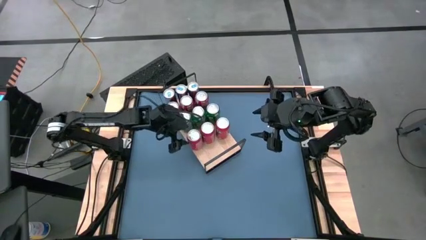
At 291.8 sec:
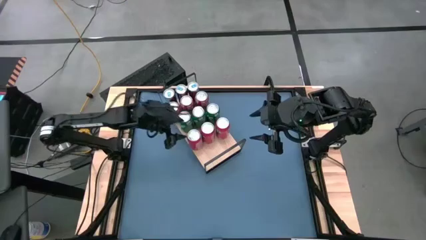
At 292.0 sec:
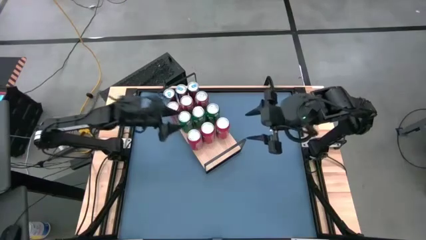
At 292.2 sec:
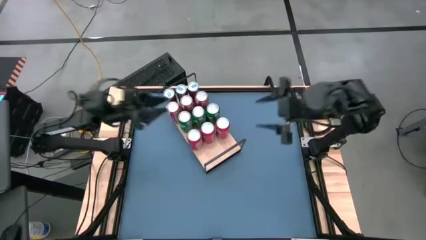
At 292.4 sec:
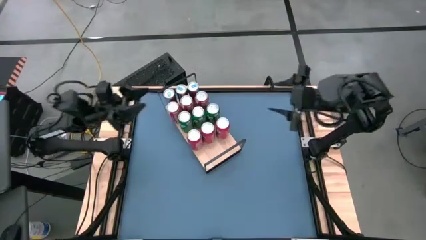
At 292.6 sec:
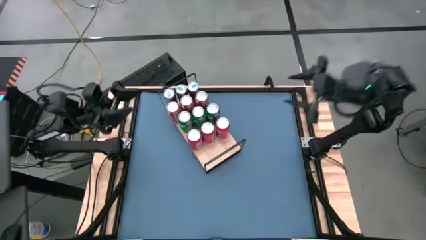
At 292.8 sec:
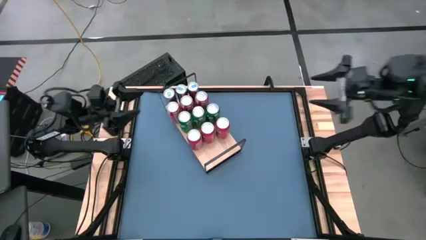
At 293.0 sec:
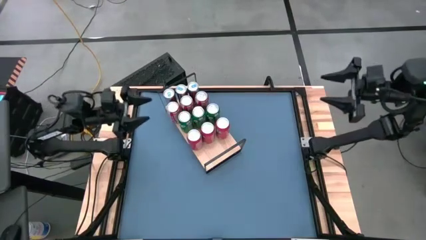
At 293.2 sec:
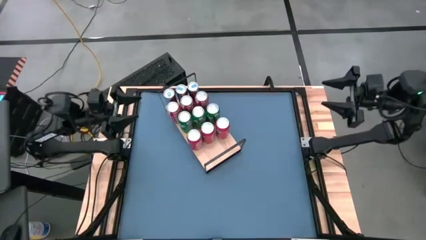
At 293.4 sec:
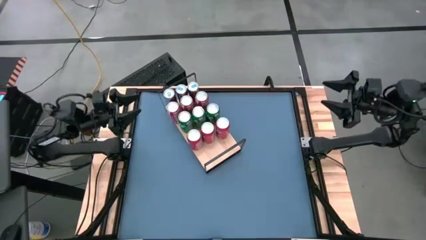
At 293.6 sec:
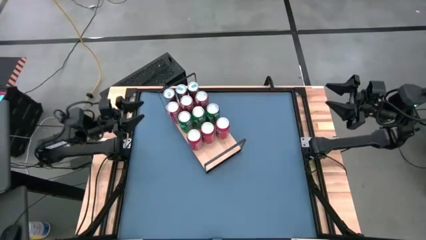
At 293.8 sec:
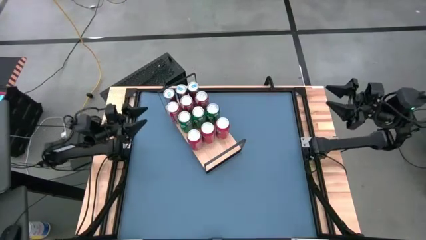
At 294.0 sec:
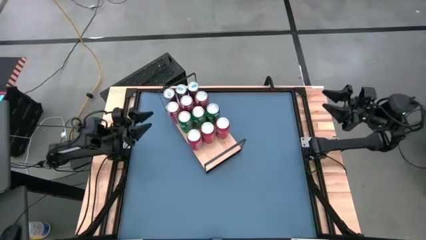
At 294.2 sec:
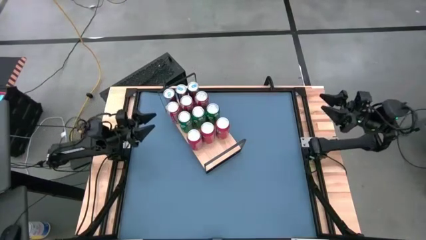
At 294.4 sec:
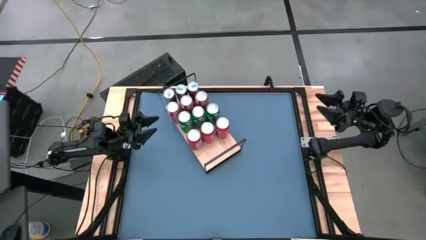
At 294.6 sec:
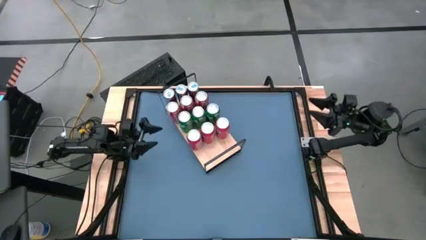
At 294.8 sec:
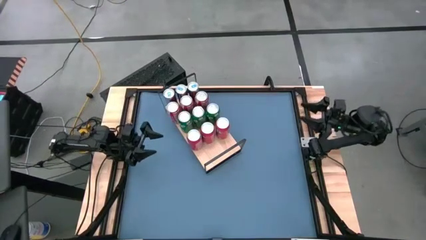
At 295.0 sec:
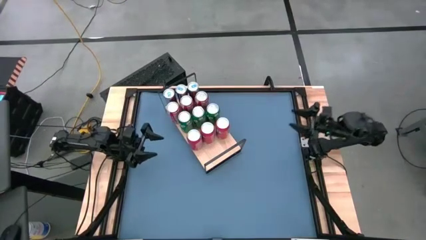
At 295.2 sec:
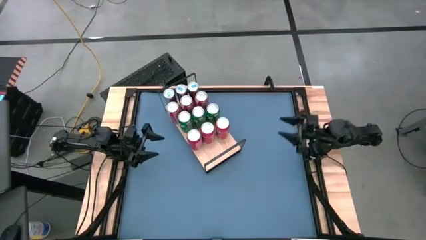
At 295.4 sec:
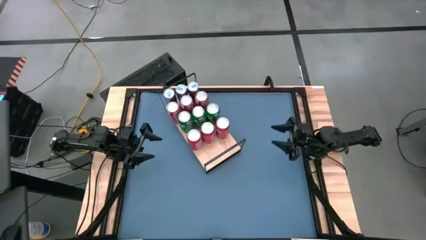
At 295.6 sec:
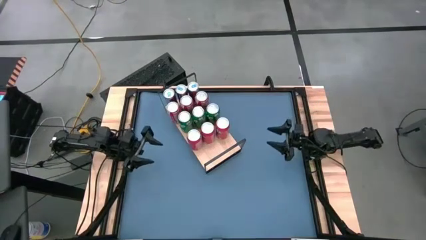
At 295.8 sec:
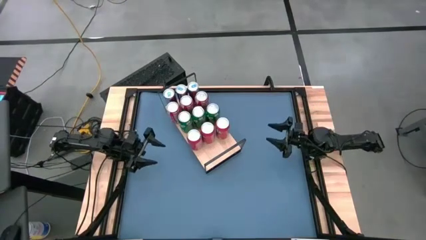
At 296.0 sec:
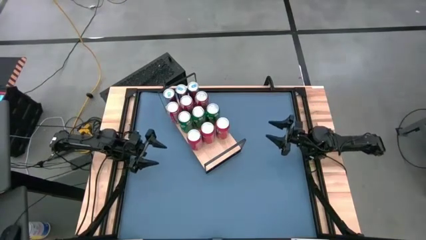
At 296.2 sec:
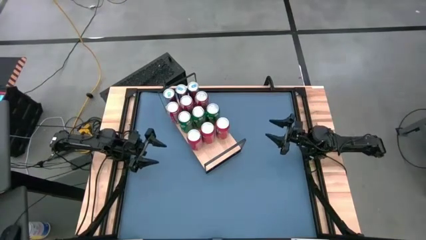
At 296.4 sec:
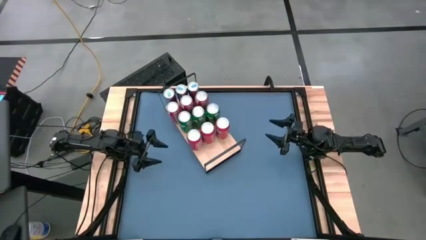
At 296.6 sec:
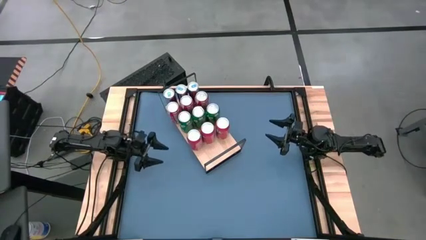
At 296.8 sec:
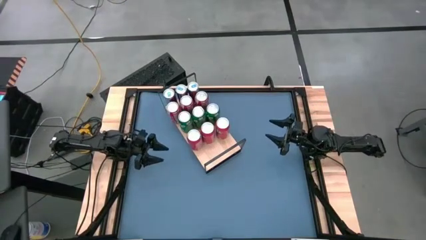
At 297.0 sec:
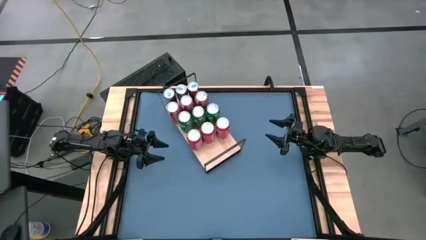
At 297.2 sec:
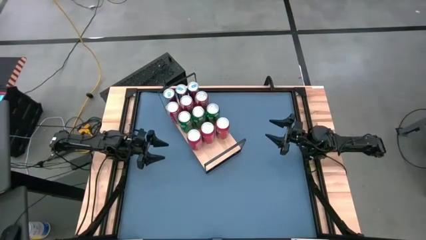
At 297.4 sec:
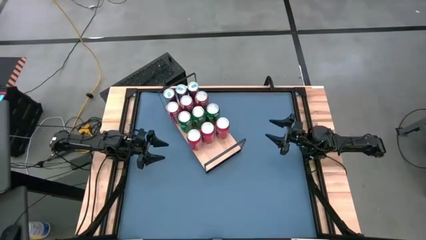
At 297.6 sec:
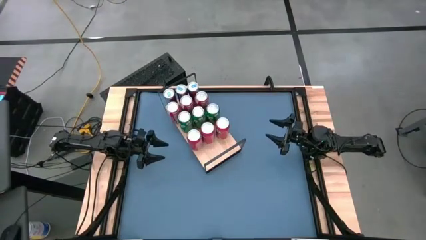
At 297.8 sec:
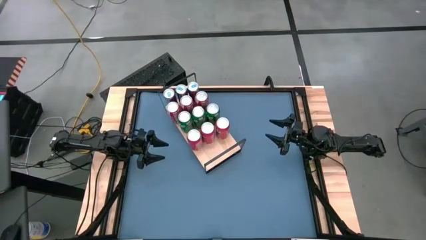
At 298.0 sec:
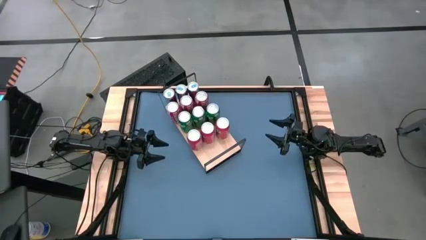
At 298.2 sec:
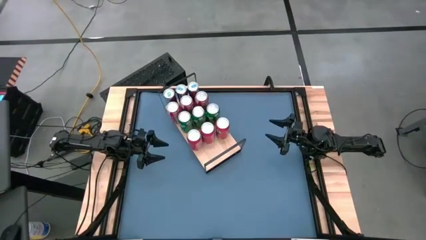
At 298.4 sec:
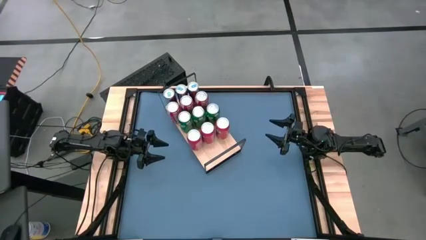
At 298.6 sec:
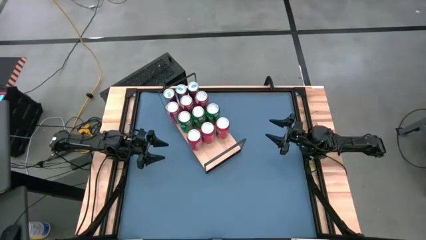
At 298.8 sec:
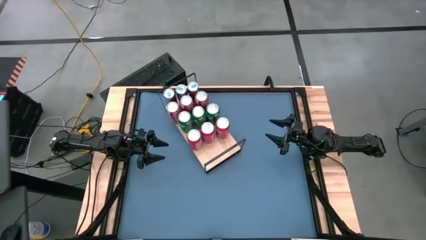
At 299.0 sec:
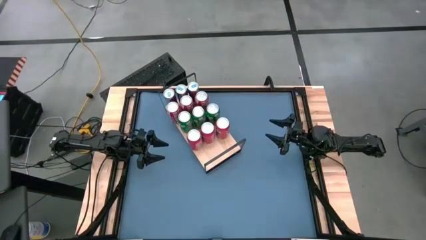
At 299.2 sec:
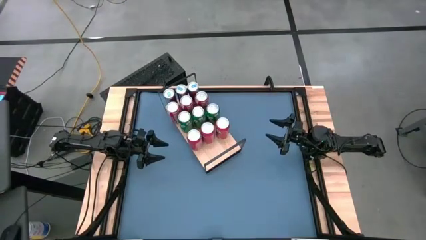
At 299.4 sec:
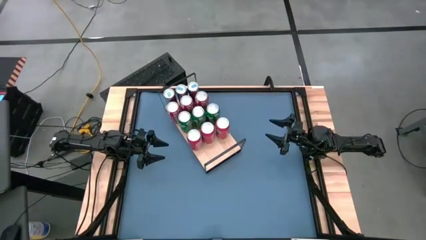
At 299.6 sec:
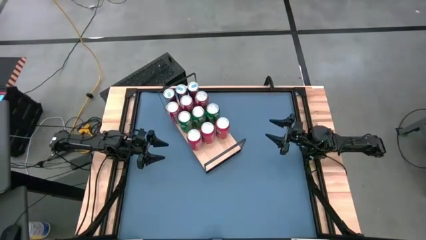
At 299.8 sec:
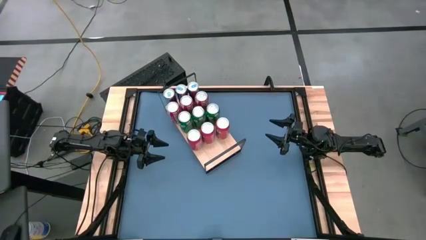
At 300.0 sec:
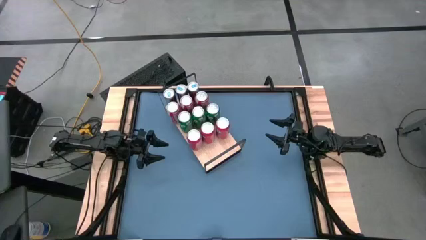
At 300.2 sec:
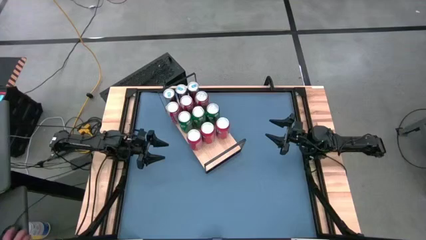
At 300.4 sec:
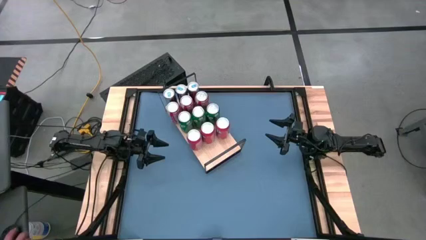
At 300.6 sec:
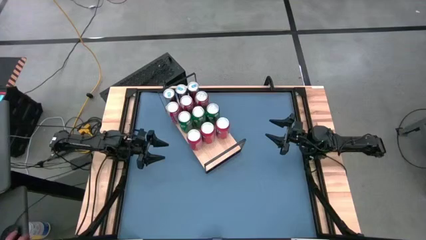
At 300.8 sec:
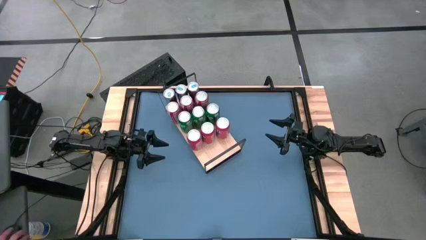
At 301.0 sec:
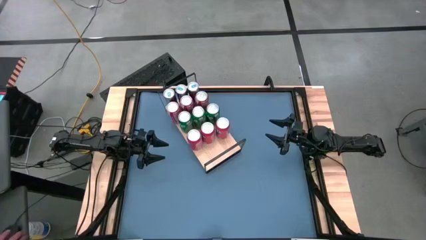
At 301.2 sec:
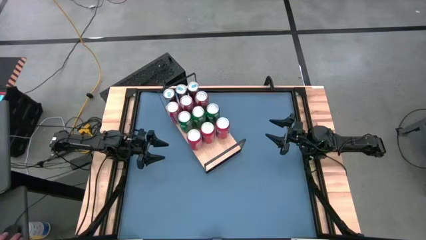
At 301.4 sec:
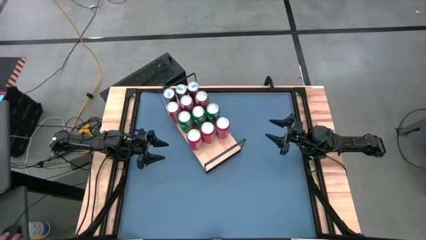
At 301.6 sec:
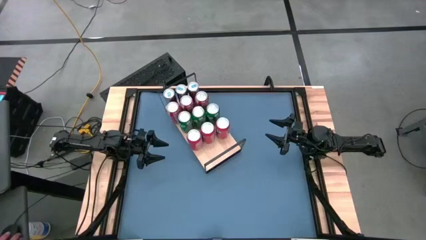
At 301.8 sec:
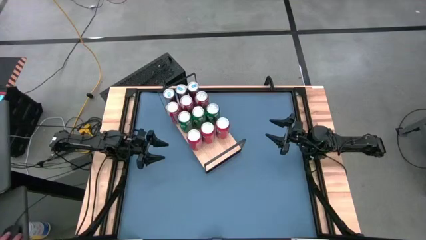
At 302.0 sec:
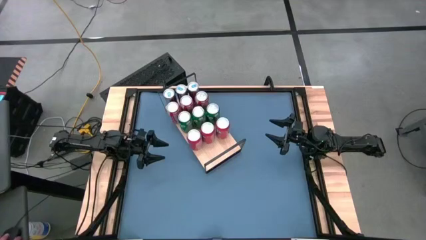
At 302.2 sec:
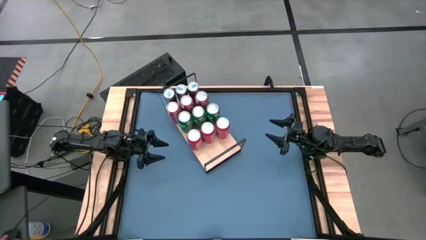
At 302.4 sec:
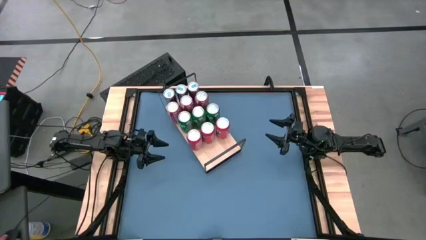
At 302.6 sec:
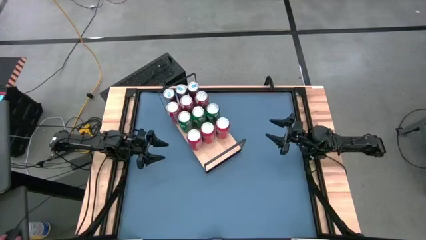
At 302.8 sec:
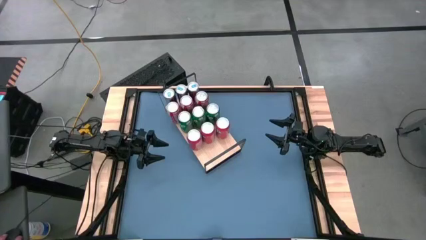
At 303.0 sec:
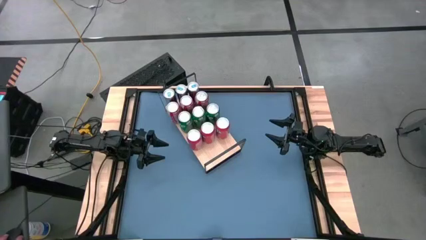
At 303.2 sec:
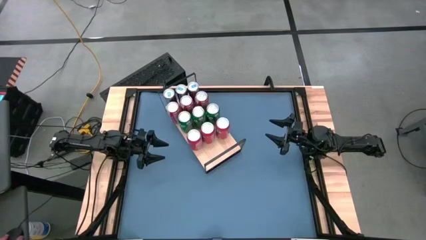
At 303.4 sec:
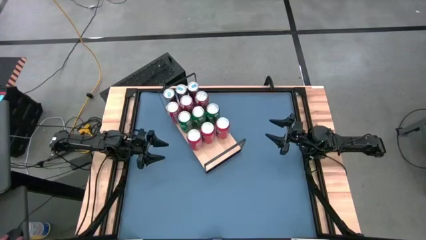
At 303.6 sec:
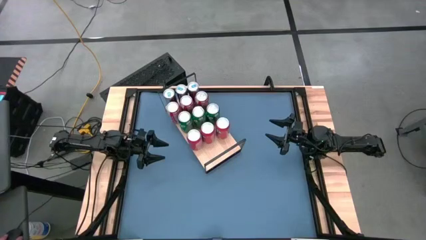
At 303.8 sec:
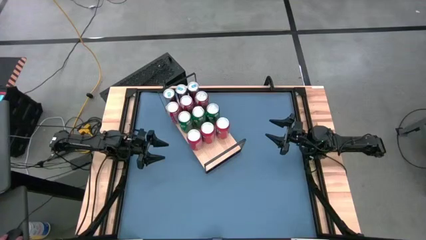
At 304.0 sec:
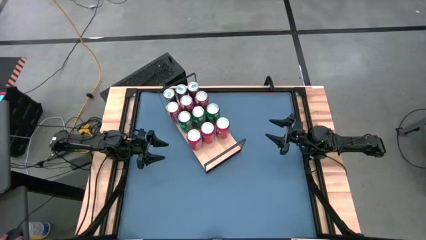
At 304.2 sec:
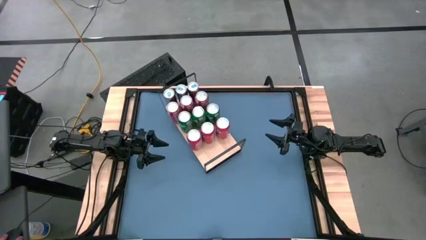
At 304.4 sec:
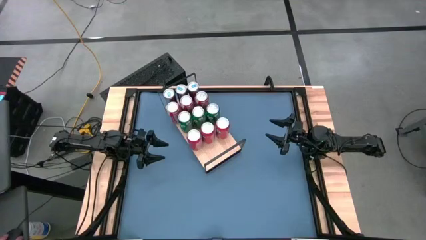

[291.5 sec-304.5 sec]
Task: Place canned beverage on shelf
Return to Home Position

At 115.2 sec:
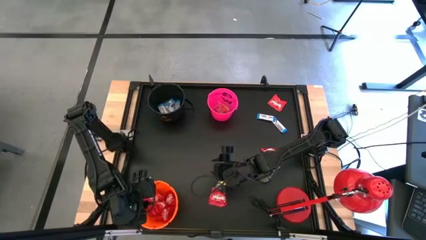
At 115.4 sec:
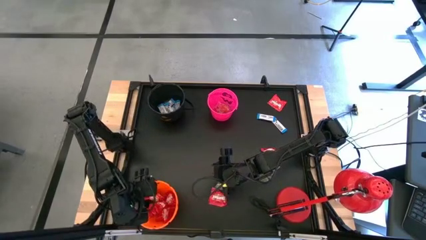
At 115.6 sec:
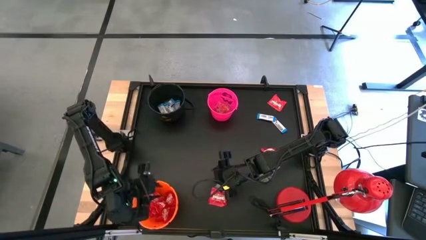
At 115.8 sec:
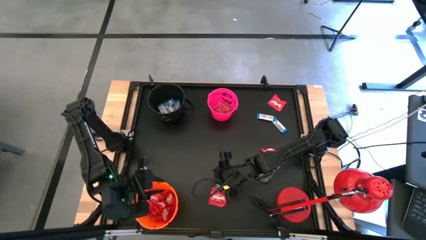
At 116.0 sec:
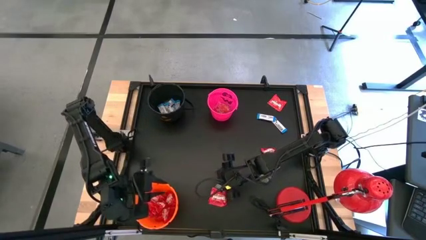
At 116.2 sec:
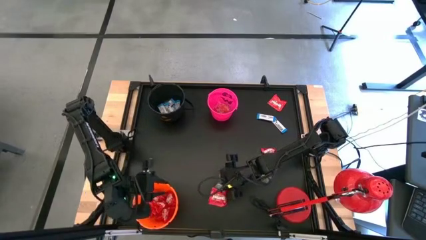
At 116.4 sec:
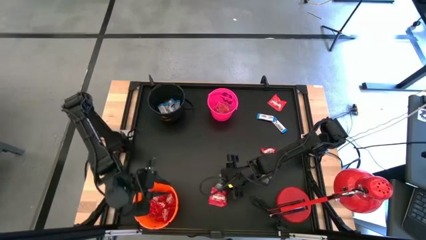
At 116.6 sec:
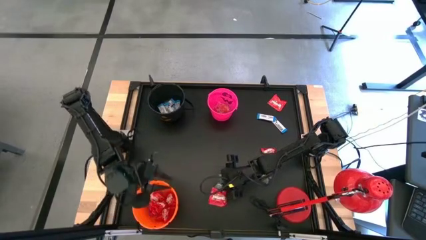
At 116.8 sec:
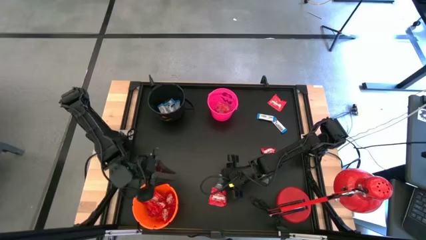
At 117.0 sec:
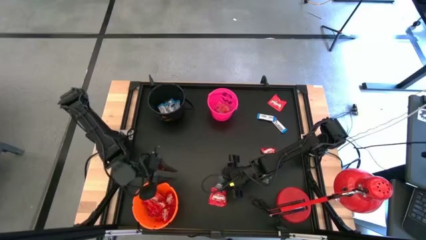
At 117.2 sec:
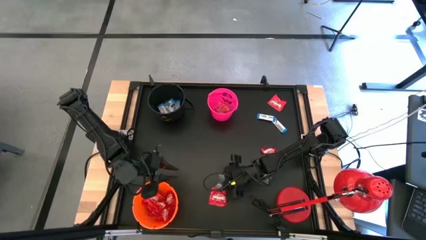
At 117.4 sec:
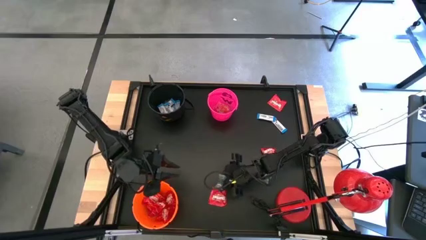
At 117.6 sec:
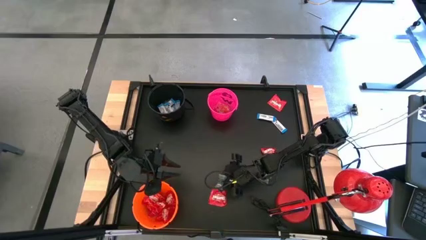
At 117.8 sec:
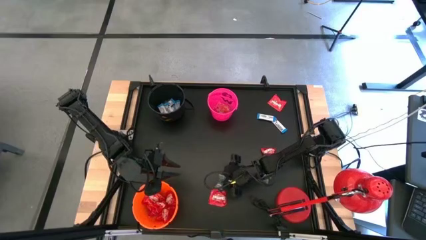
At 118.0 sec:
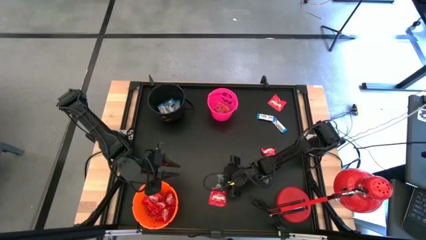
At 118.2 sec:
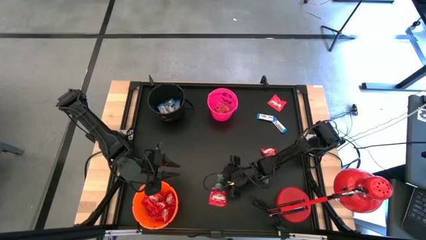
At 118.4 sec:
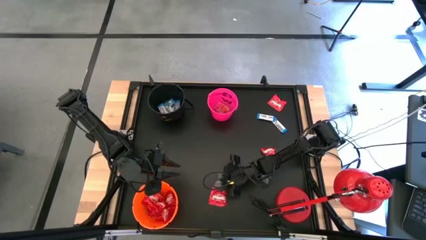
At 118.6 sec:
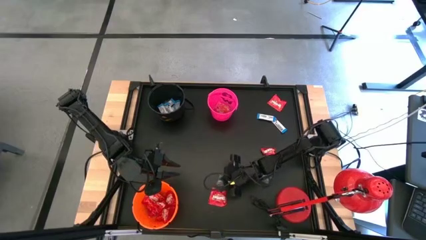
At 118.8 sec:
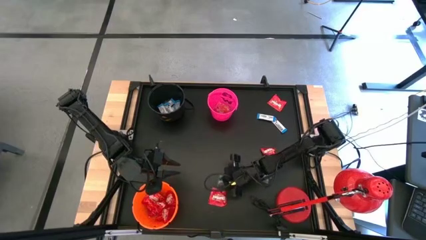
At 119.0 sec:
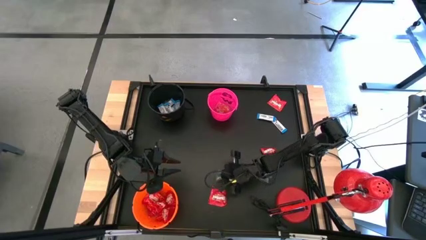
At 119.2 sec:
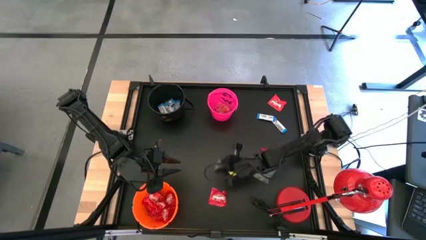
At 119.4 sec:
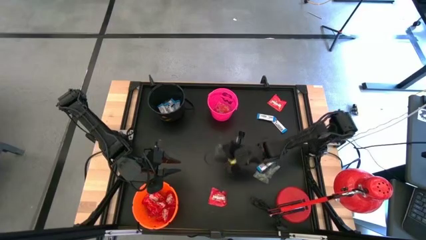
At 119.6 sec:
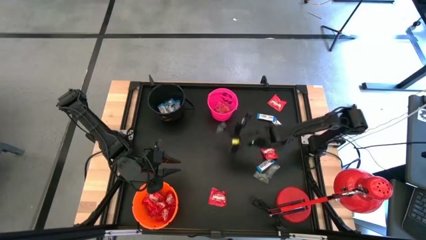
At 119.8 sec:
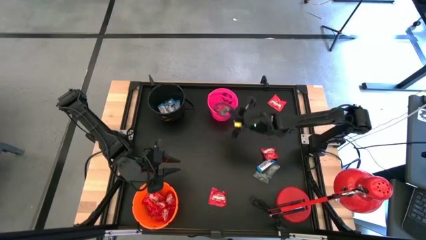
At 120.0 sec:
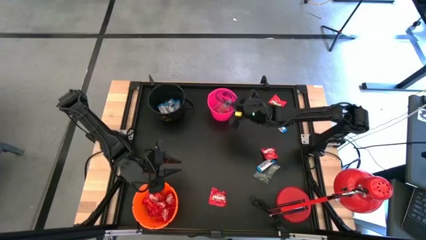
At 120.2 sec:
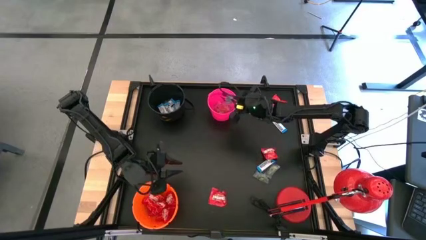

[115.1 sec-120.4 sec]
Task: Organize candy in baskets
Put the blue gummy into the pink bucket
